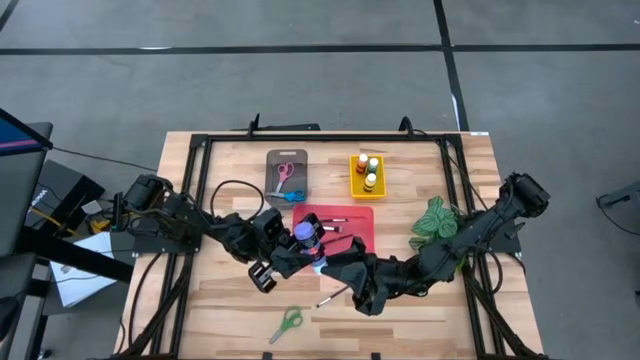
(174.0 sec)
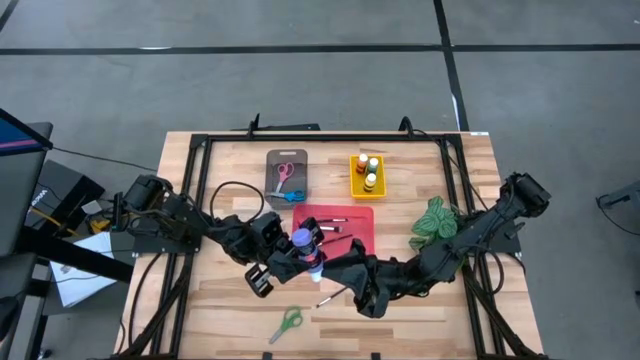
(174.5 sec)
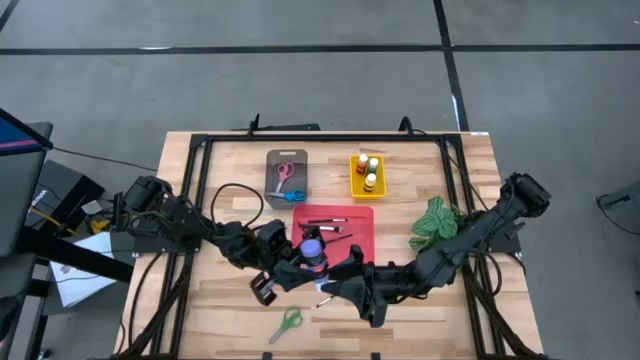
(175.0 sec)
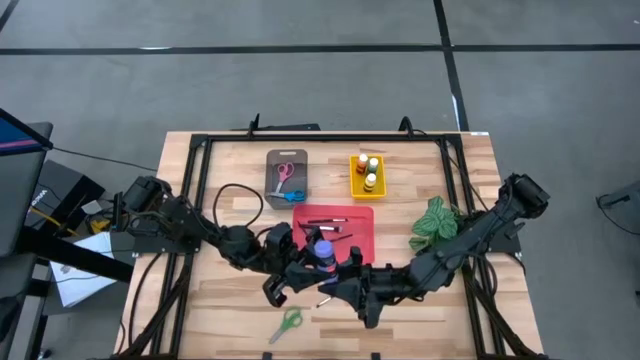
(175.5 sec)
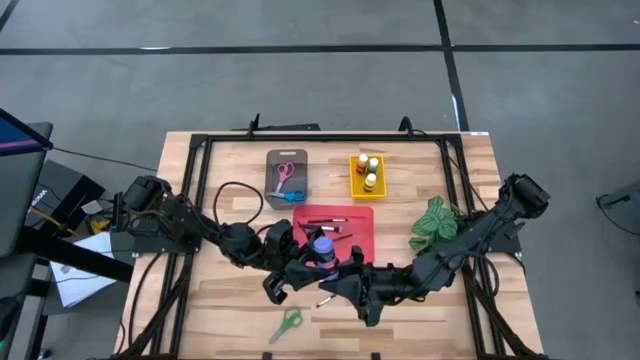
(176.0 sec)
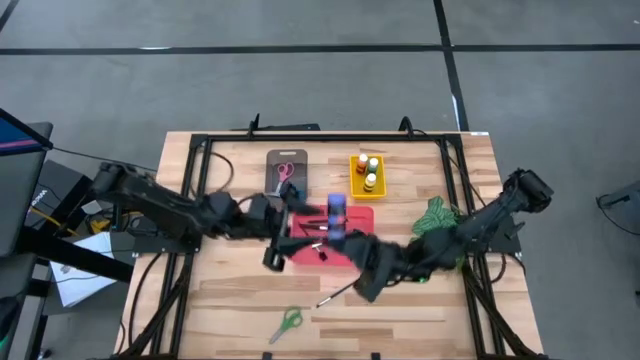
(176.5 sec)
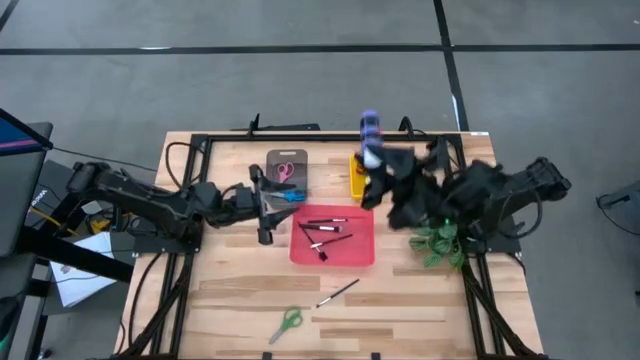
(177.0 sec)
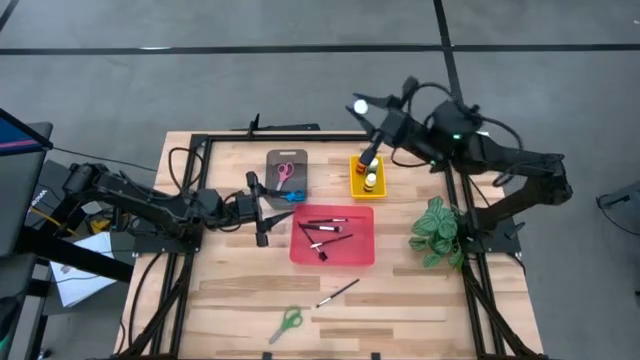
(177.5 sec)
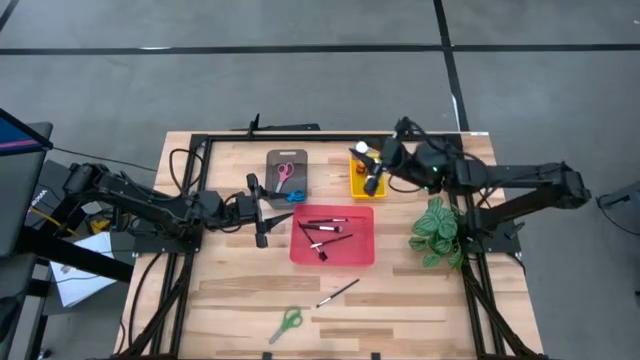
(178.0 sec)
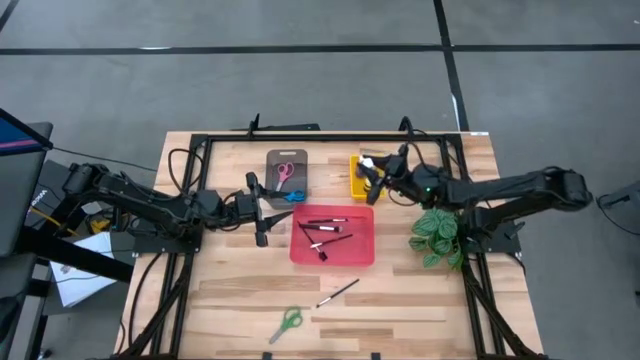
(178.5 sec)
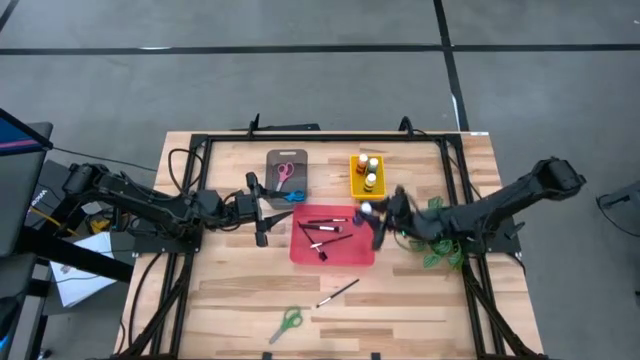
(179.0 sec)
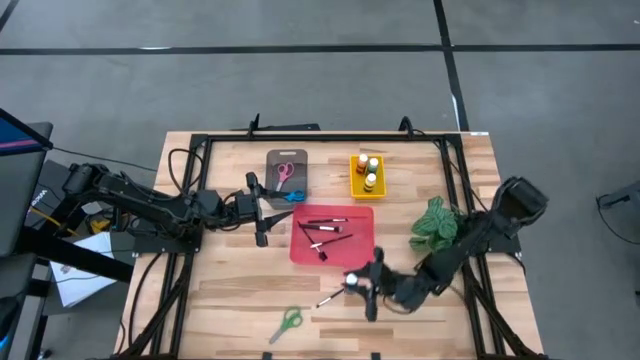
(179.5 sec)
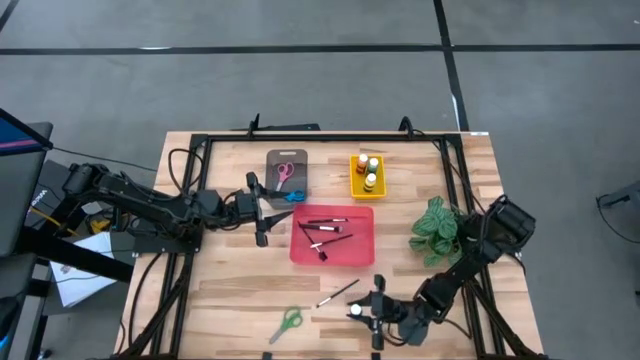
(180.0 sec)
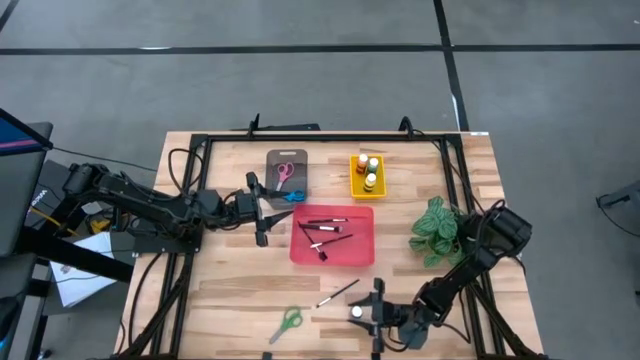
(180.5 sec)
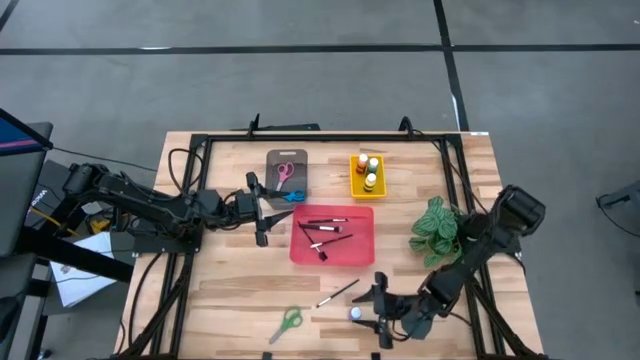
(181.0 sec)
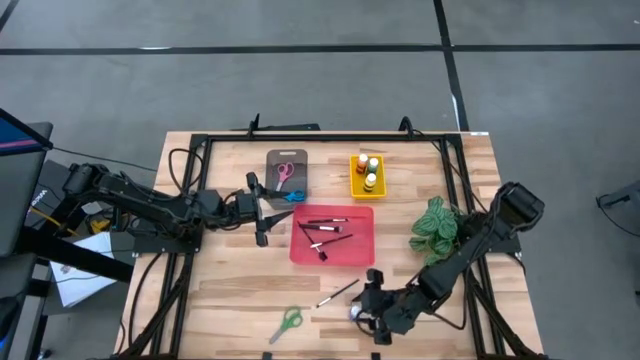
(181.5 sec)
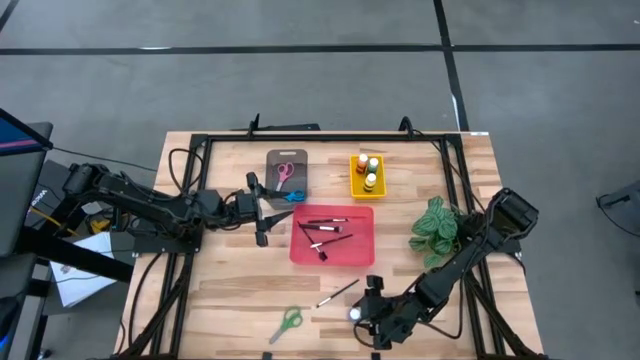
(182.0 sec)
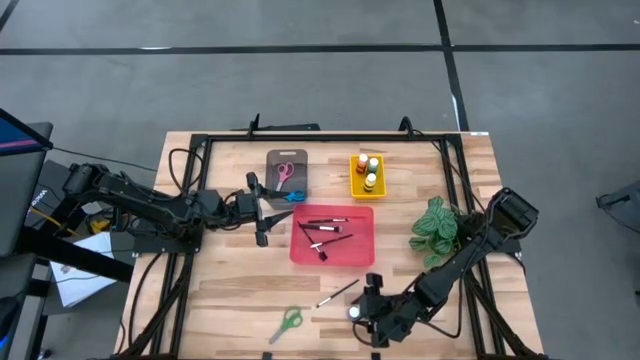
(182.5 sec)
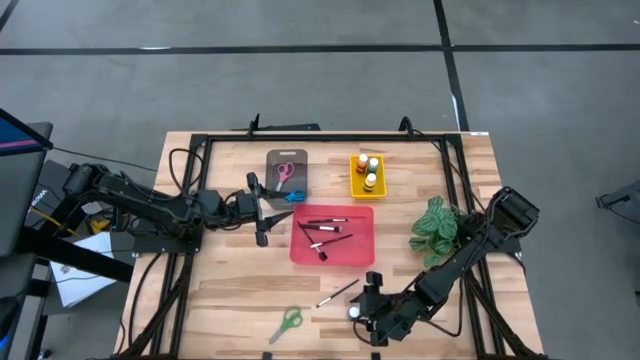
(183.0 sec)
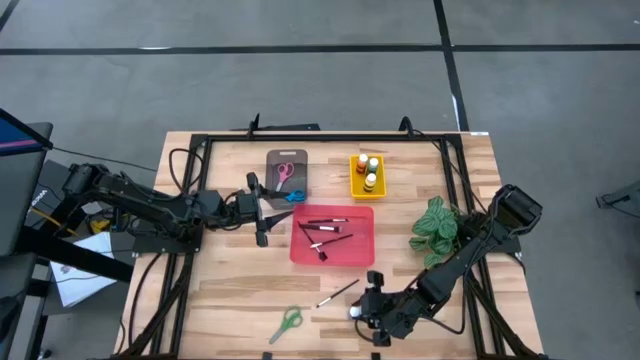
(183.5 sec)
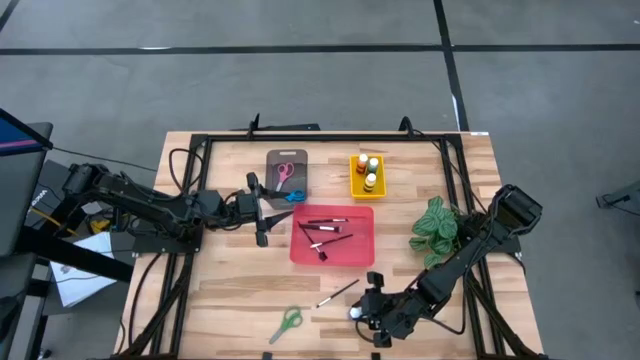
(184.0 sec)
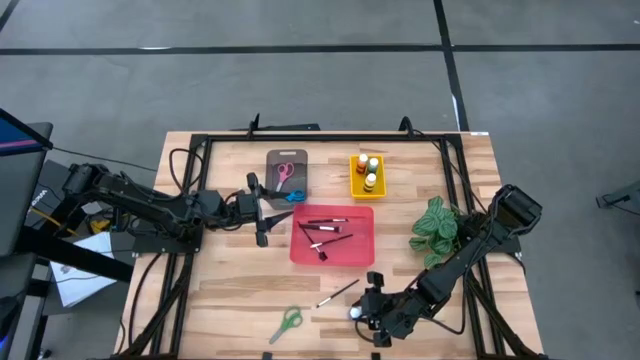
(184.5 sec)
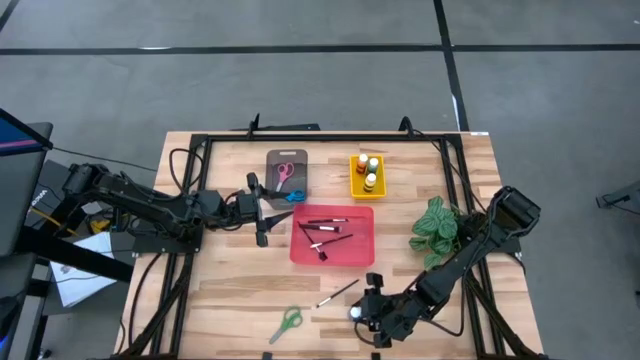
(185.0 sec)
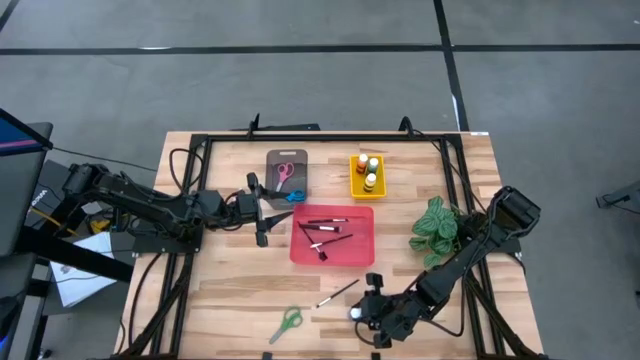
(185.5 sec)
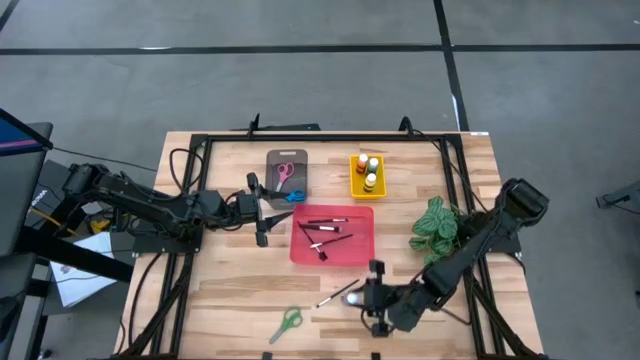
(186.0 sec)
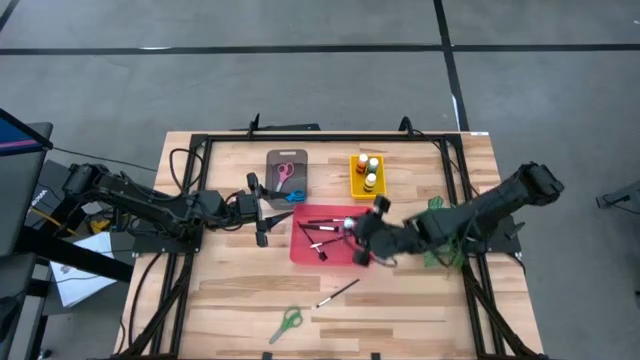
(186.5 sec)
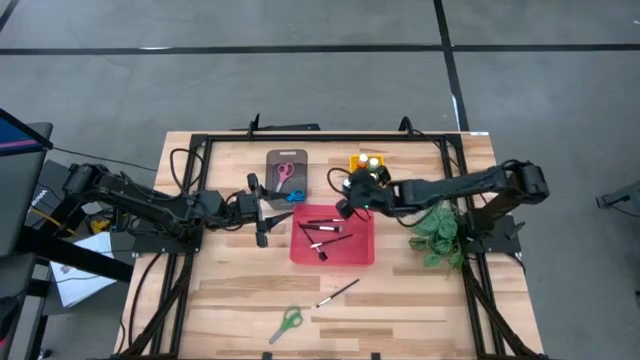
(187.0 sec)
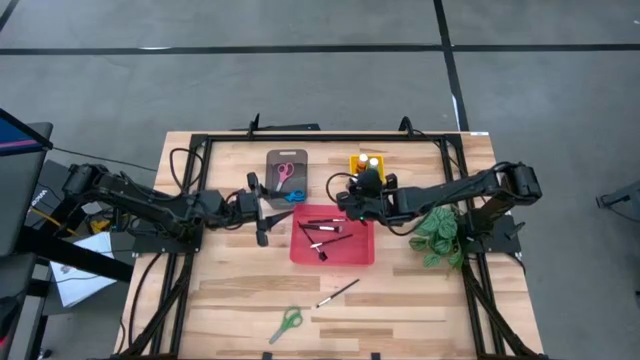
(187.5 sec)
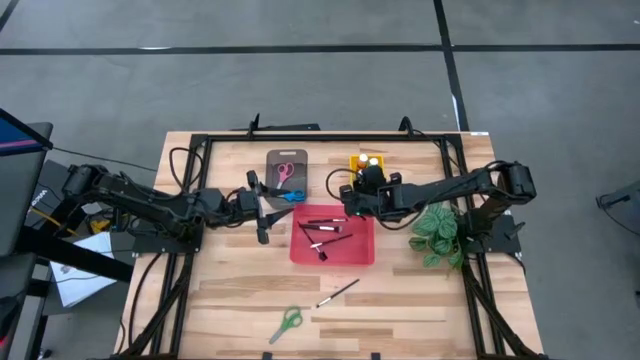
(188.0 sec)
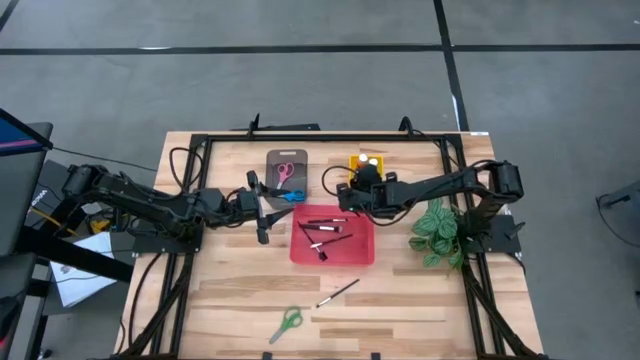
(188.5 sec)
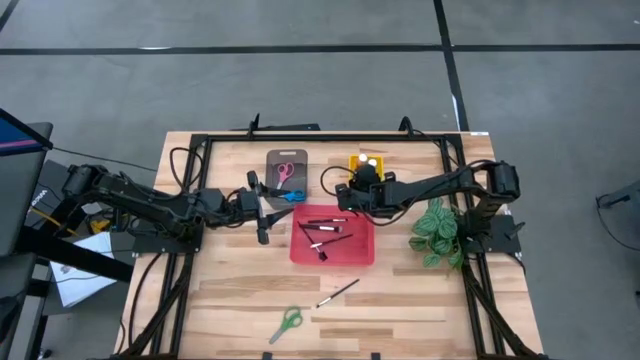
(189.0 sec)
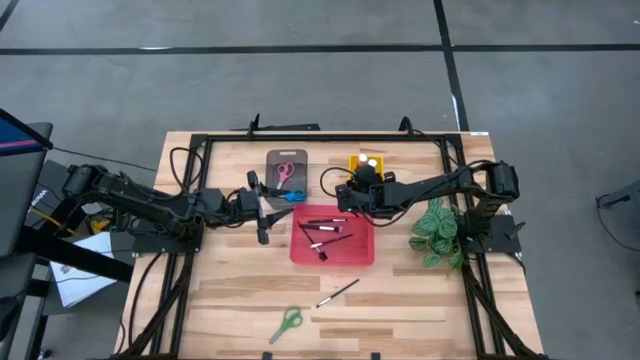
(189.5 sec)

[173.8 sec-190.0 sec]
Task: Pick & Place Paint Supplies
Put the violet paint bottle into the yellow bin

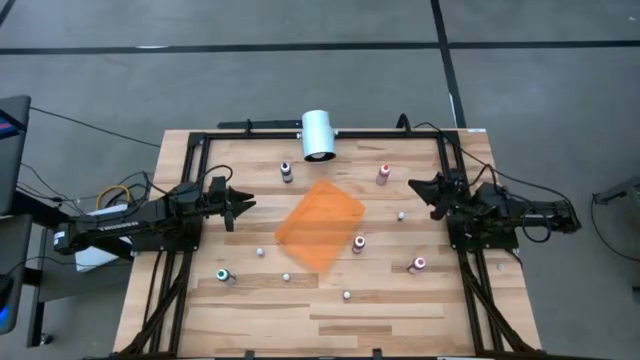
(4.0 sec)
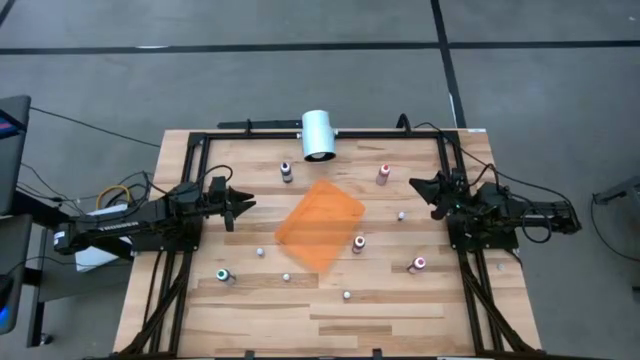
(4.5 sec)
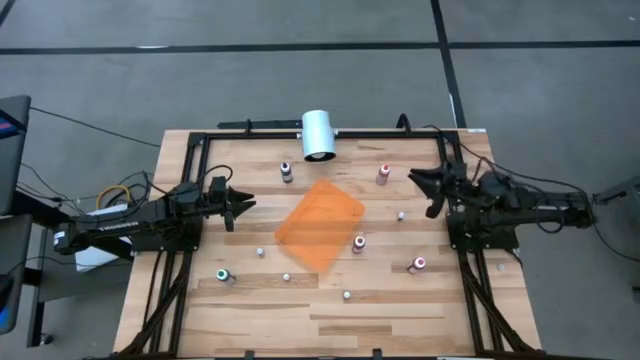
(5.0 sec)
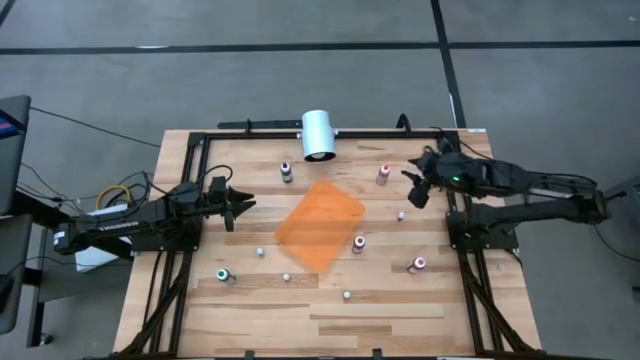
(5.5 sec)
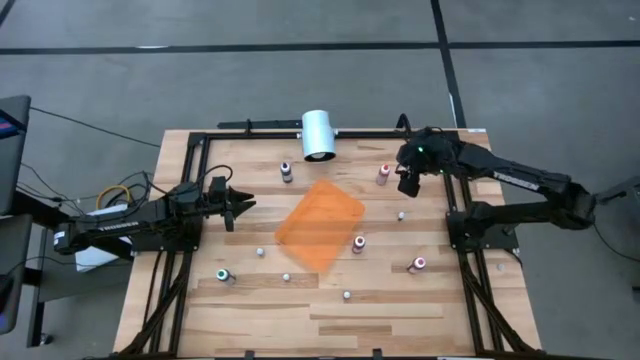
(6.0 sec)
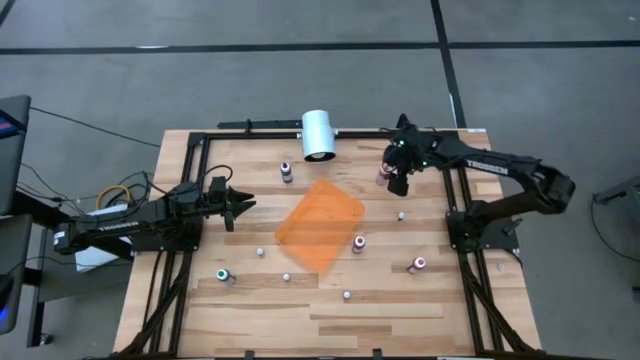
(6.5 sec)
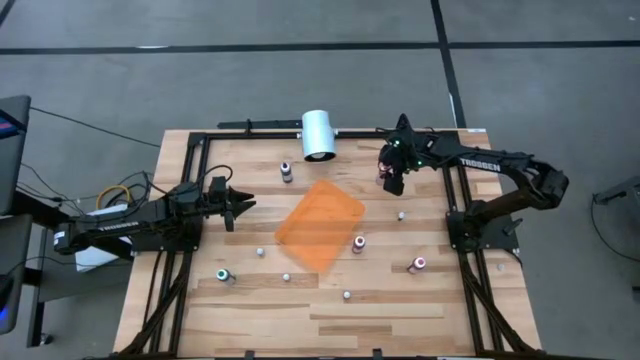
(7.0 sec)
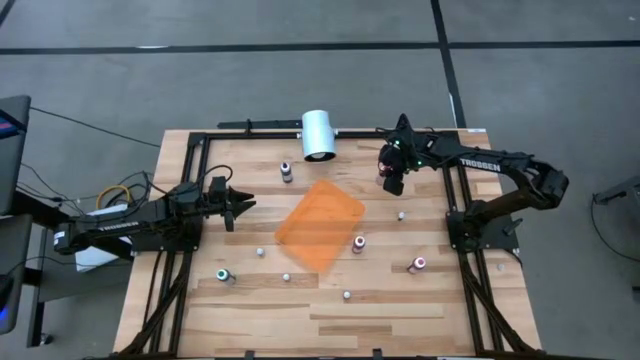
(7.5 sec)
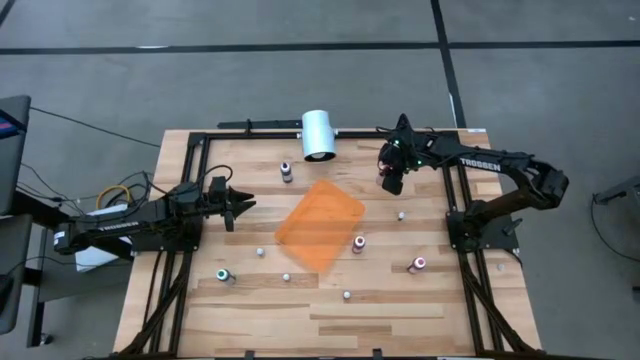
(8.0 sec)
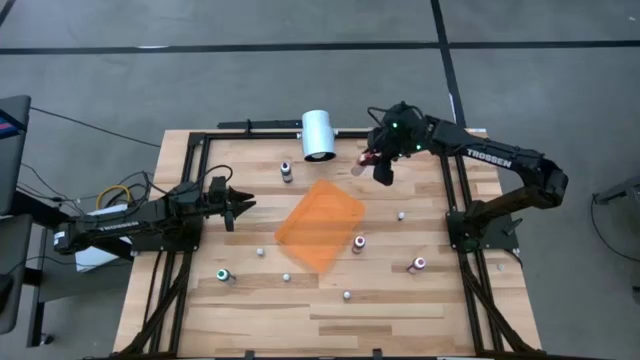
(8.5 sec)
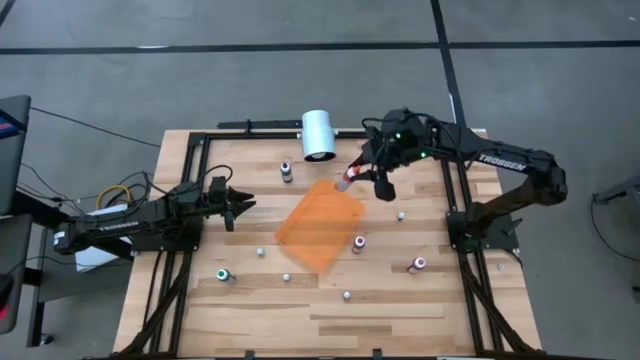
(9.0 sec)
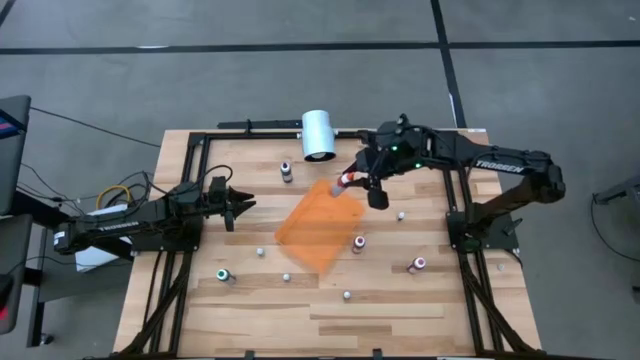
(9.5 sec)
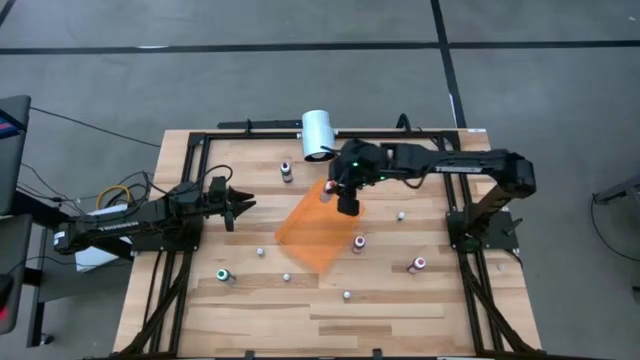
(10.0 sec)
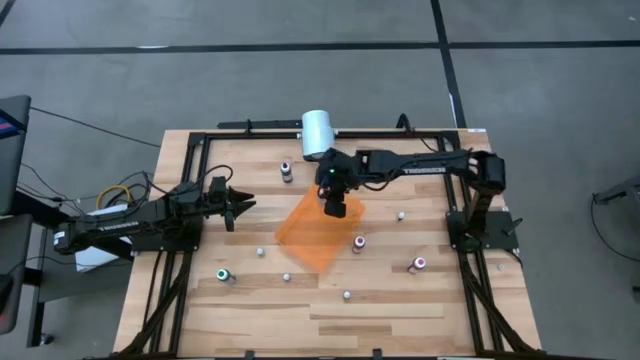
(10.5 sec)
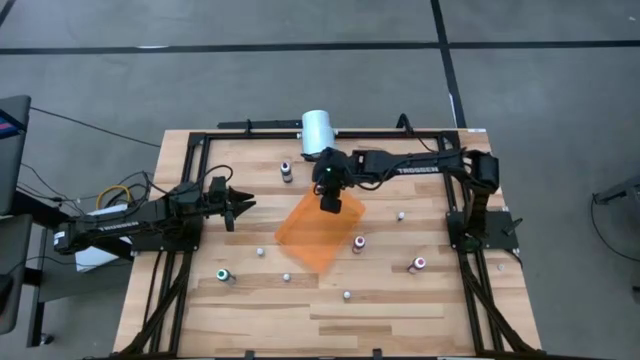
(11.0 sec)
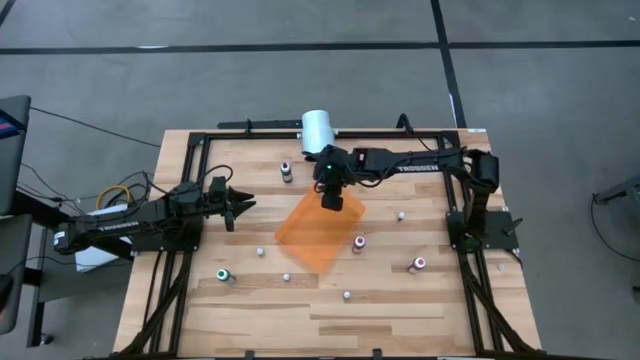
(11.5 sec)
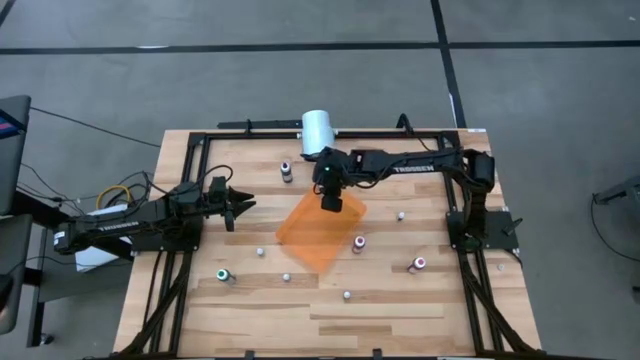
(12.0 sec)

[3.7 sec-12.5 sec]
Task: Pick & Place food coloring
Put the big orange food coloring bottle into the orange bin
